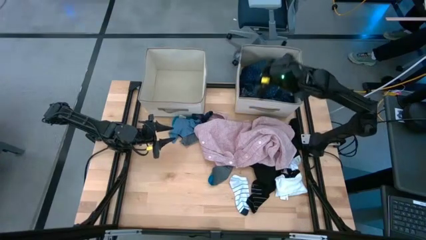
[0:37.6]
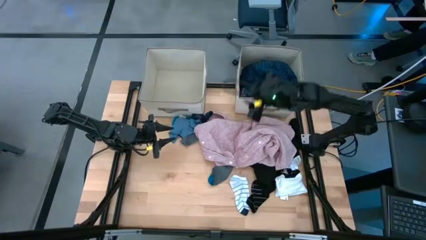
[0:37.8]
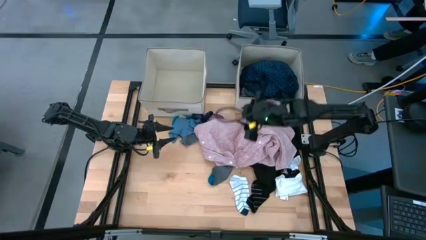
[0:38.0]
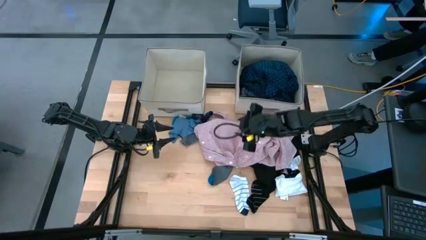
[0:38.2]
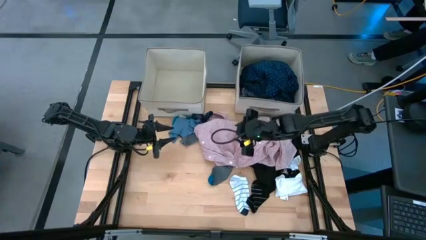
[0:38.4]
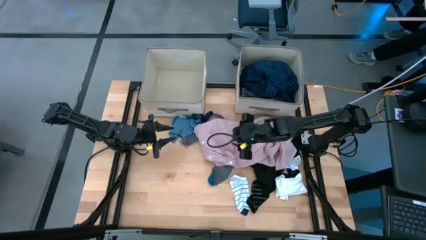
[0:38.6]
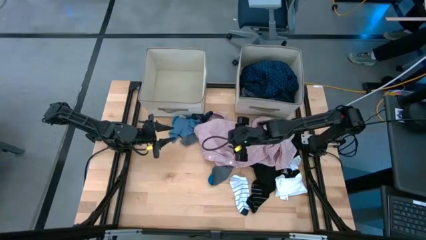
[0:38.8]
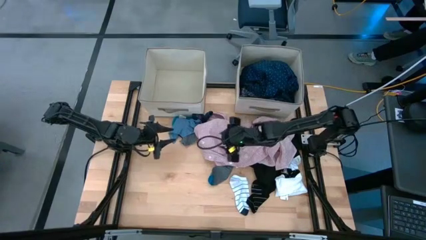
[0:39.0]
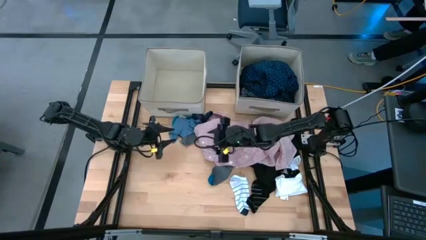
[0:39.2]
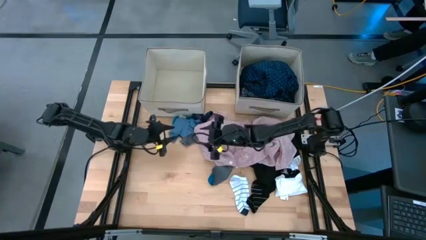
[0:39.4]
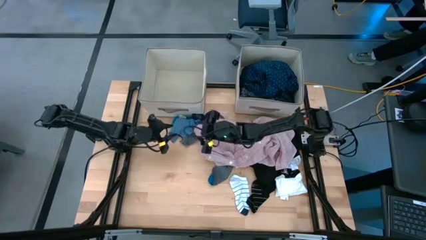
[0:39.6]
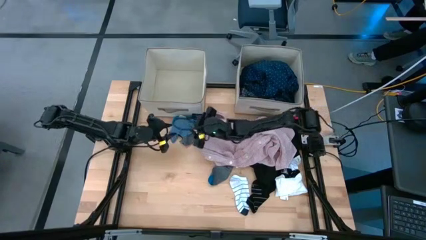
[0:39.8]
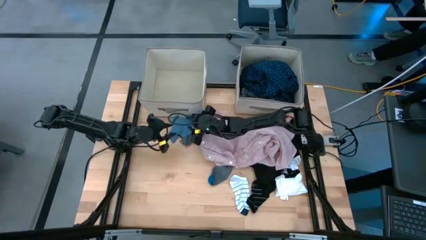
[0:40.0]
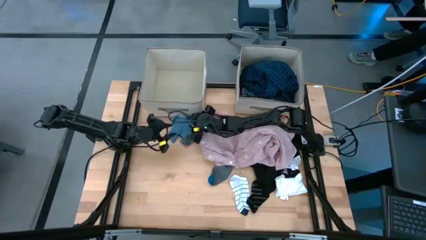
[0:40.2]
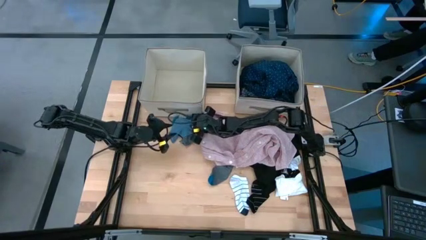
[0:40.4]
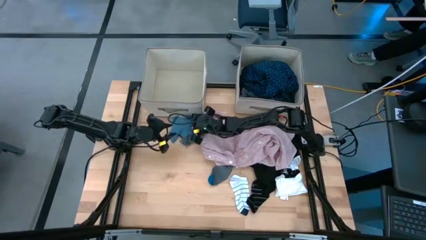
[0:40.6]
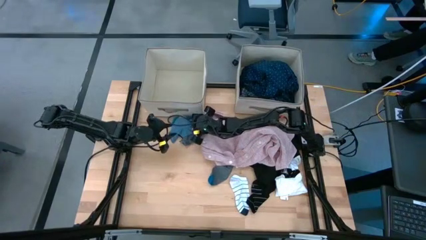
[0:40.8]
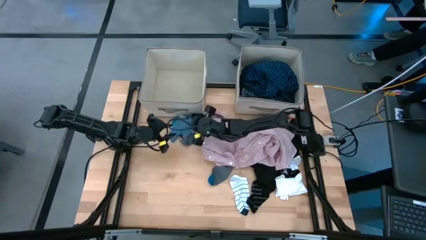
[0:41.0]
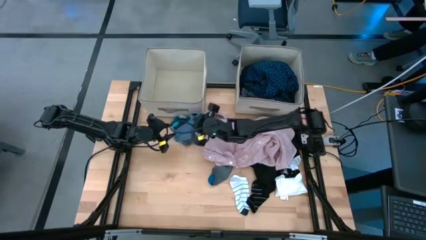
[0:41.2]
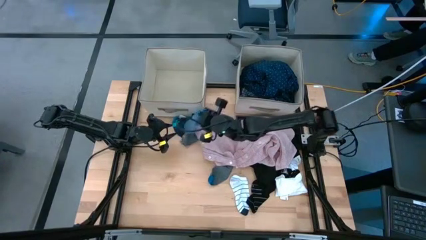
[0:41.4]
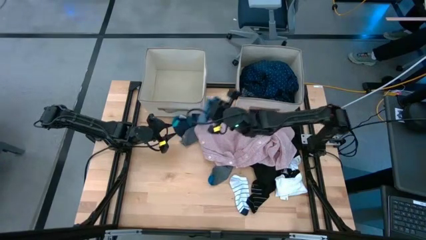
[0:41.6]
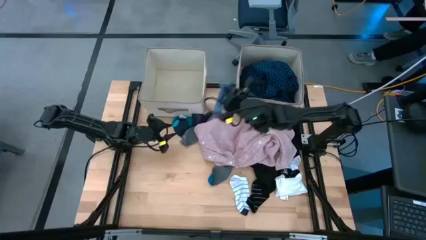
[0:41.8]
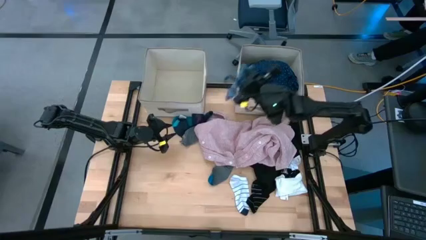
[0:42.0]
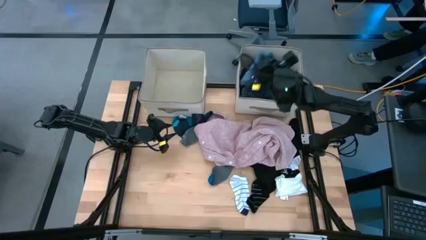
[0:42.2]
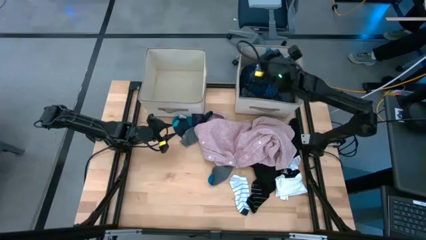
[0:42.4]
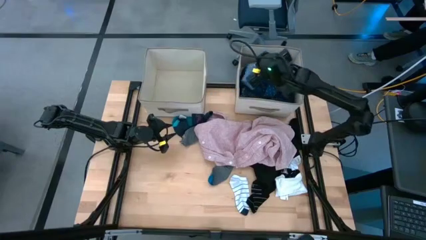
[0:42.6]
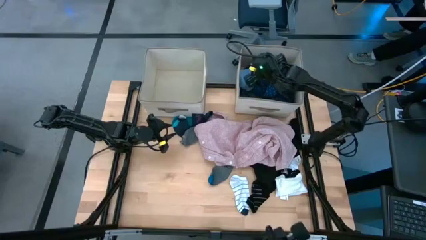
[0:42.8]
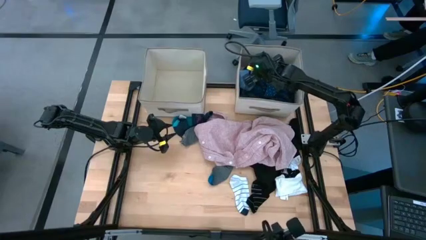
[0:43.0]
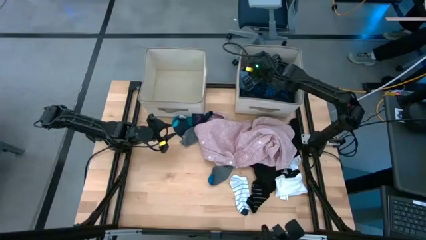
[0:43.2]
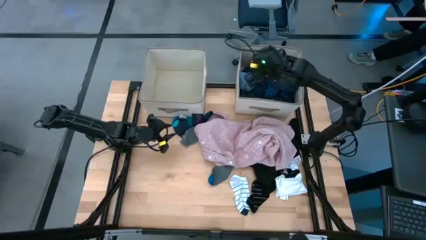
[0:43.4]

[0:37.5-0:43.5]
Task: Sort clothes
Put the top blue sock into the right laundry organizer

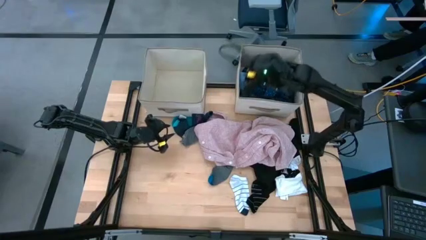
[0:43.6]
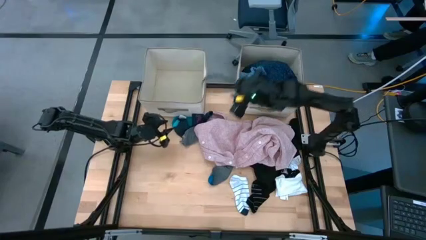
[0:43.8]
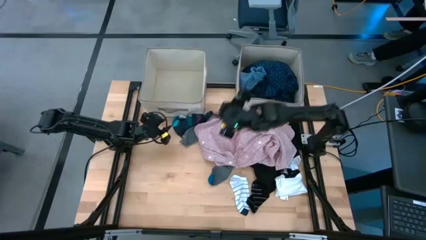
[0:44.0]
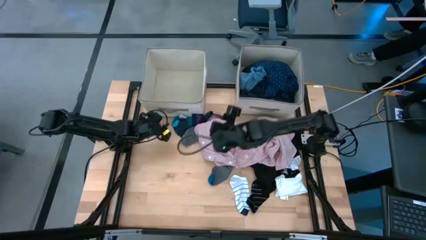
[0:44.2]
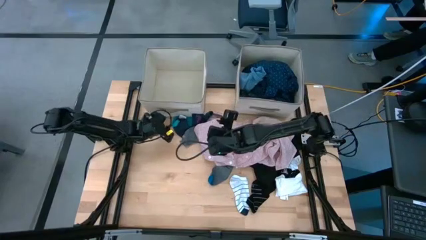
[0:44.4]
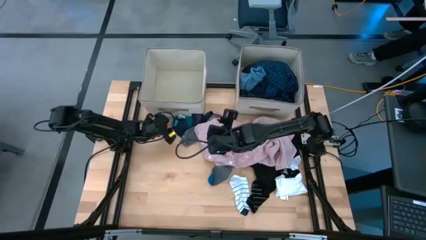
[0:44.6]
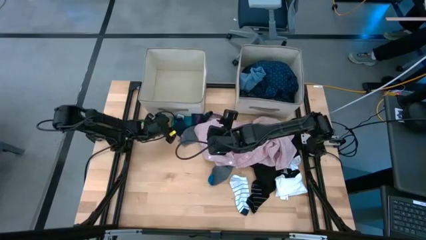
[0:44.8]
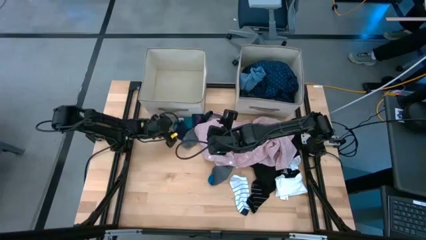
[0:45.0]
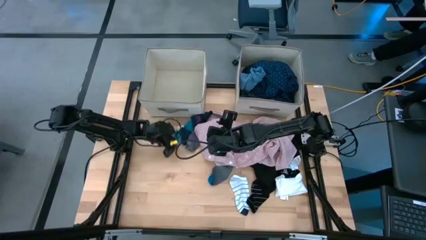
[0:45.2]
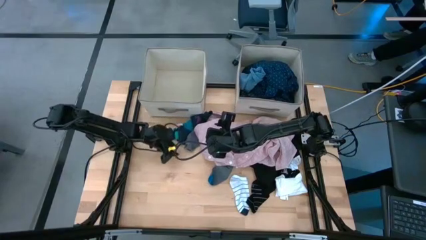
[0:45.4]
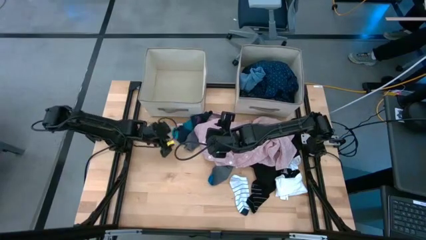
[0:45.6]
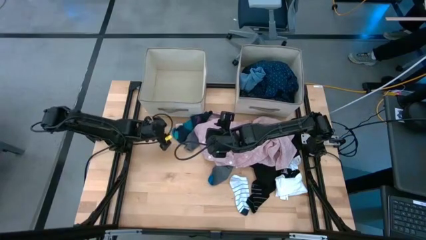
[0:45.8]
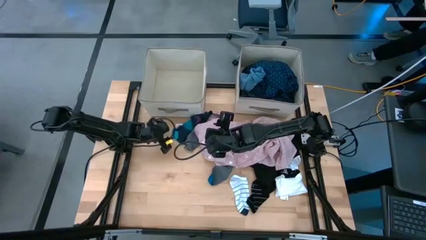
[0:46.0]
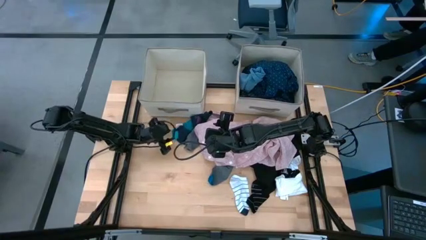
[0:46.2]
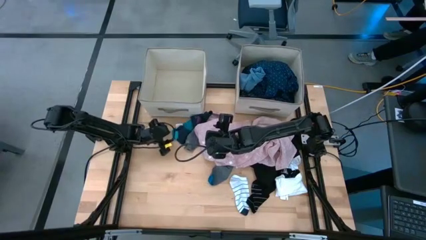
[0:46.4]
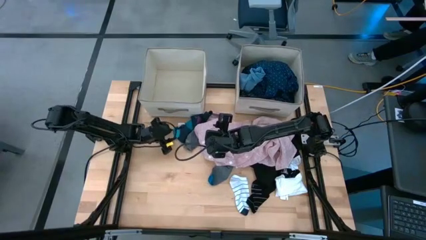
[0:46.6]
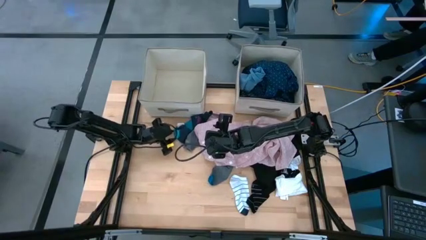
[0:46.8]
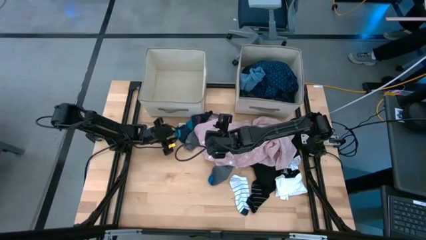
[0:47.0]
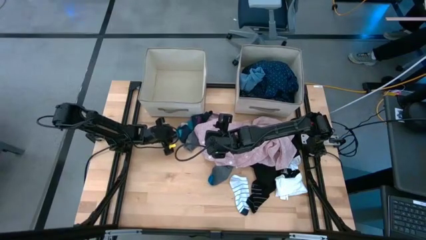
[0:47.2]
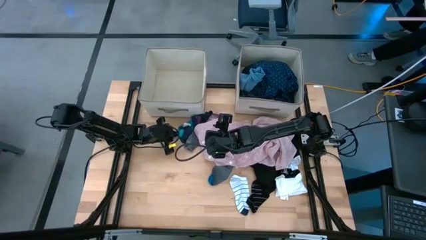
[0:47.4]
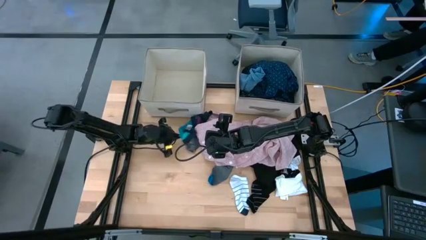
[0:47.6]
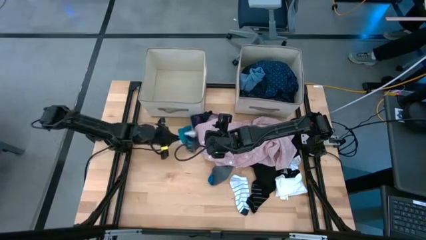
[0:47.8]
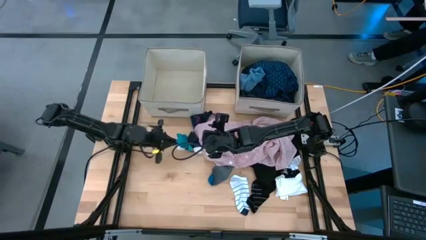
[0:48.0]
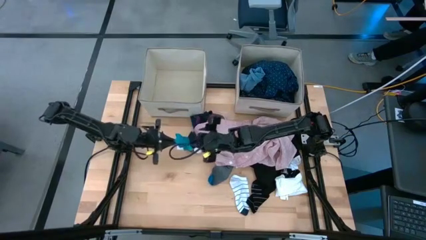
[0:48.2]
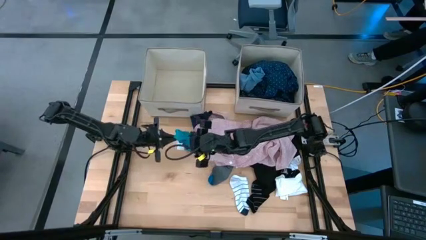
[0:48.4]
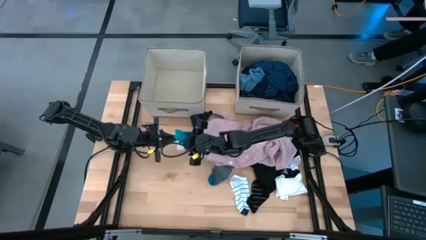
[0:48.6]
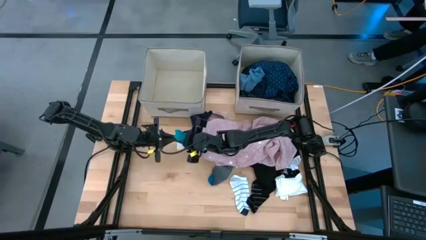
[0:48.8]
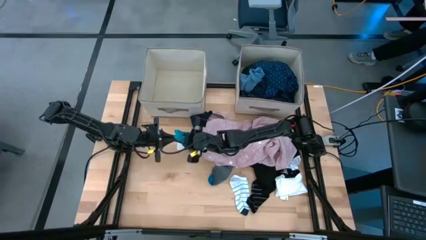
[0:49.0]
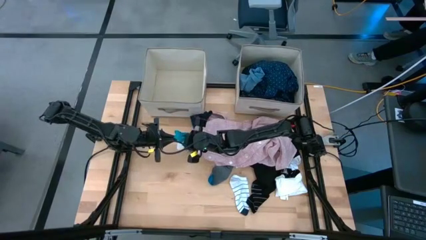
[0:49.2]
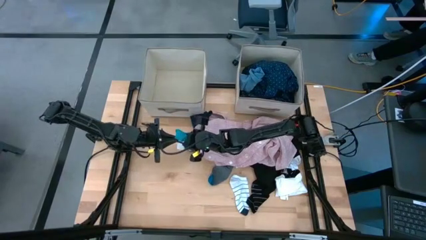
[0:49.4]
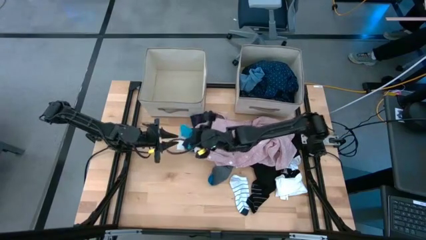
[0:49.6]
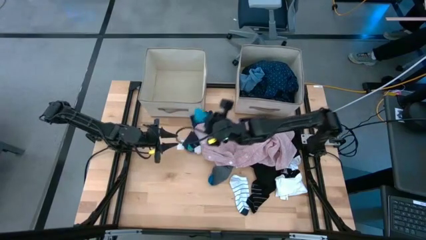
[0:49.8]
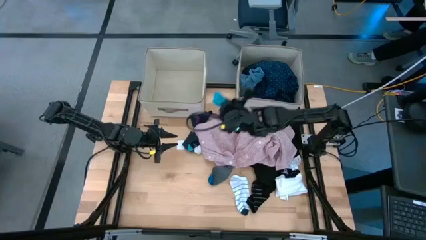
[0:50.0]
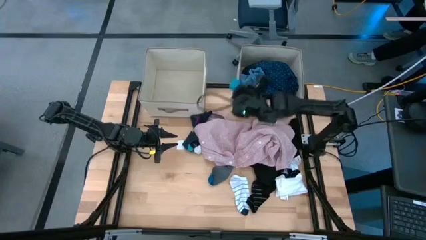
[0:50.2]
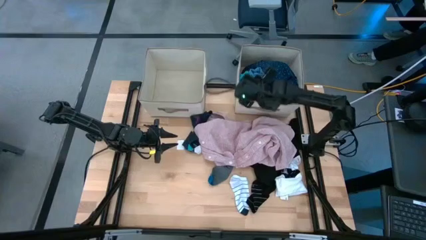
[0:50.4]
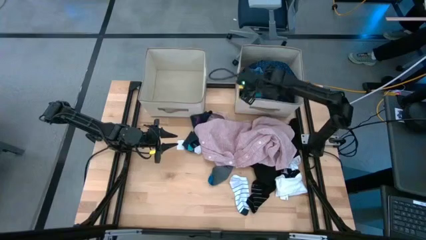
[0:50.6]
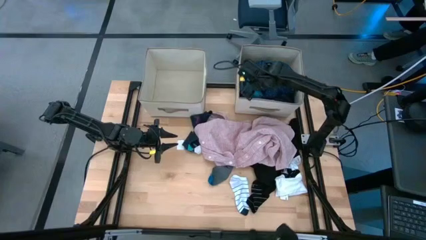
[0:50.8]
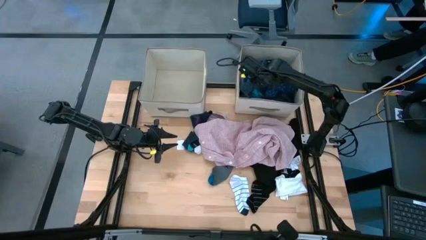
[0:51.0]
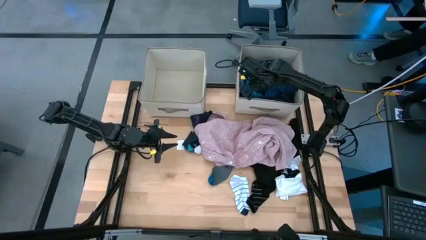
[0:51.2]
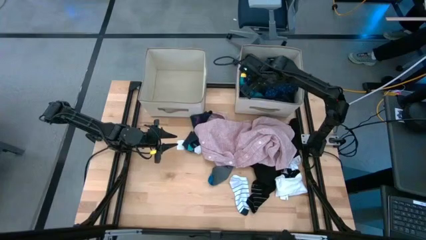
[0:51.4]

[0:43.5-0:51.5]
Put the light blue sock into the right laundry organizer

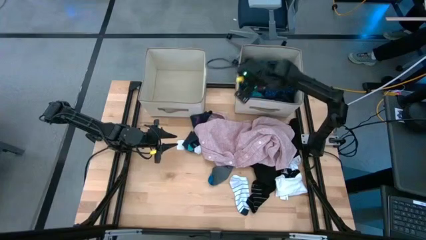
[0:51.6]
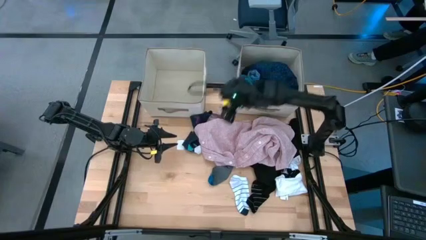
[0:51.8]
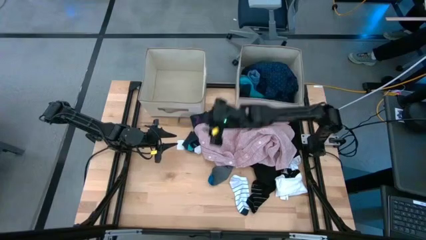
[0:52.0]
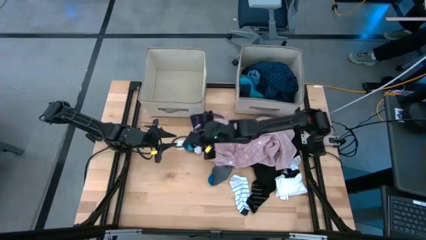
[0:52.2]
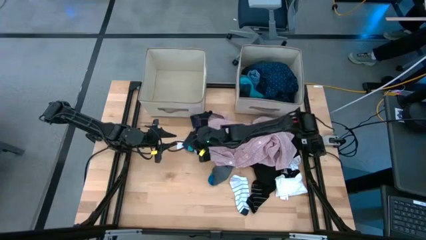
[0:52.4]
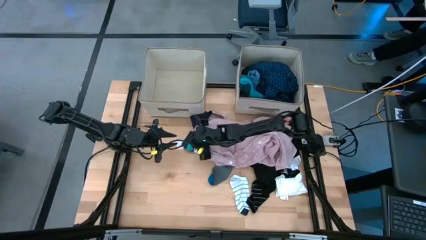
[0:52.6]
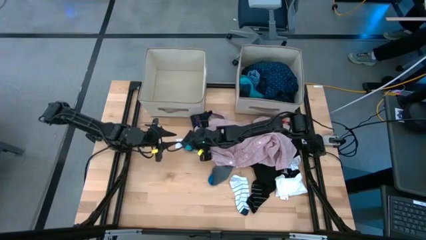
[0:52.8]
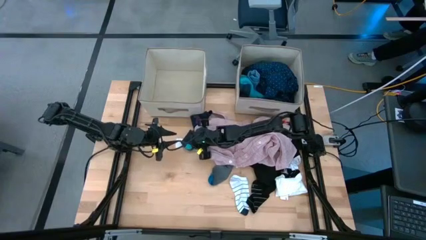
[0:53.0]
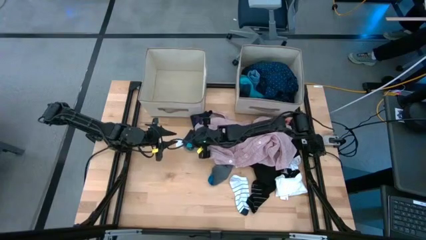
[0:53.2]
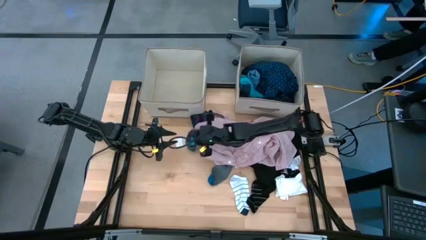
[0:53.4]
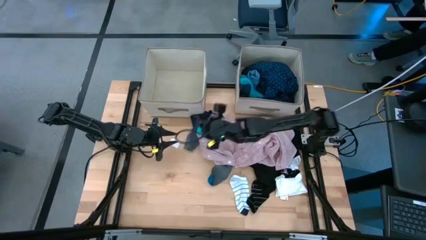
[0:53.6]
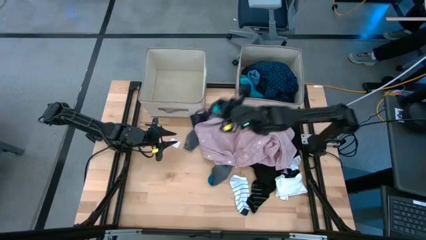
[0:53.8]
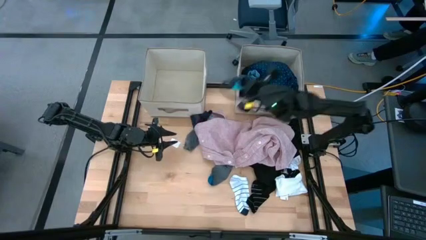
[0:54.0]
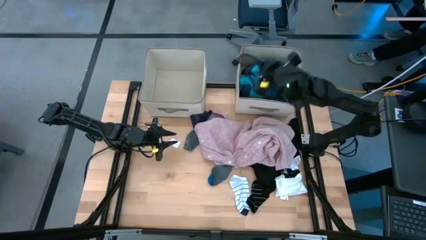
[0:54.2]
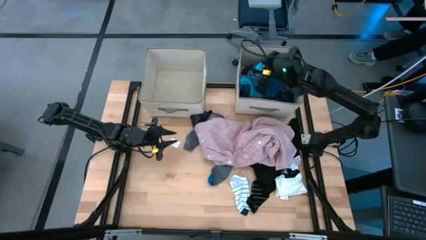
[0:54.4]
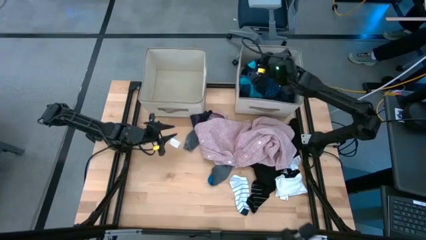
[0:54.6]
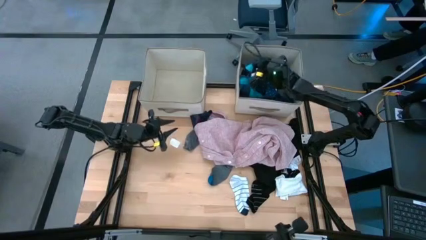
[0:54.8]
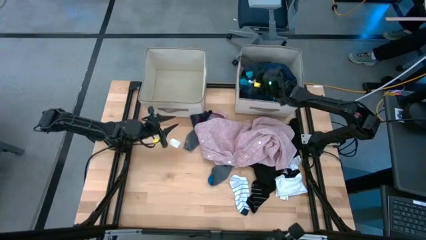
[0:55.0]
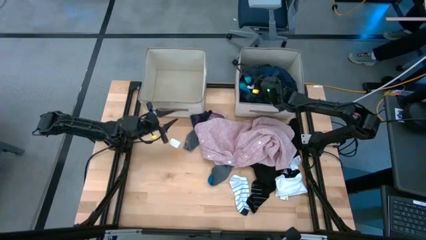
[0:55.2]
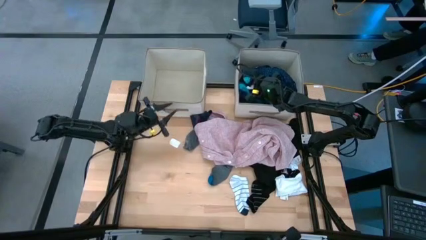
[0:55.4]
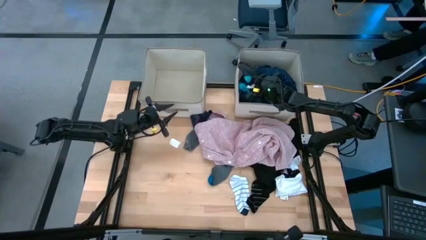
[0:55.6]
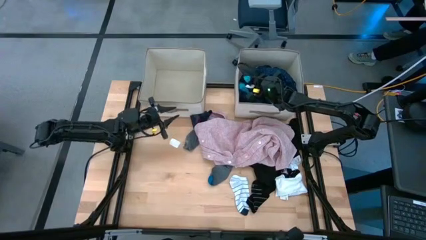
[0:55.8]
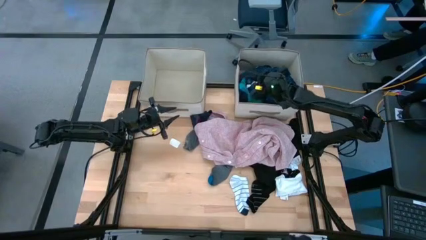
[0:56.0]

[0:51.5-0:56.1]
Put the bottom blue sock into the right laundry organizer
